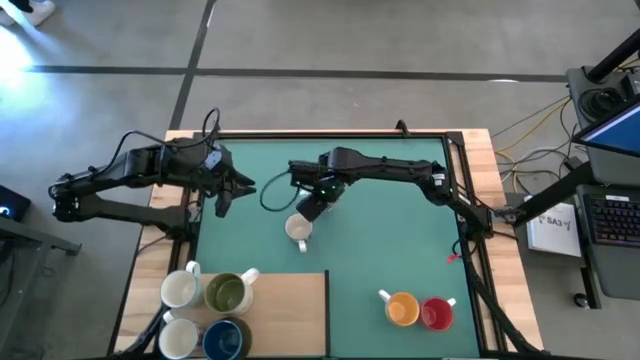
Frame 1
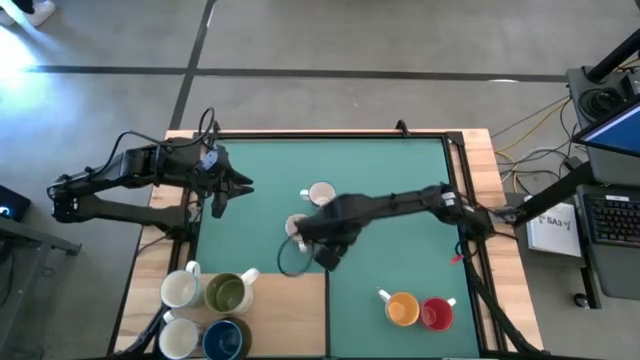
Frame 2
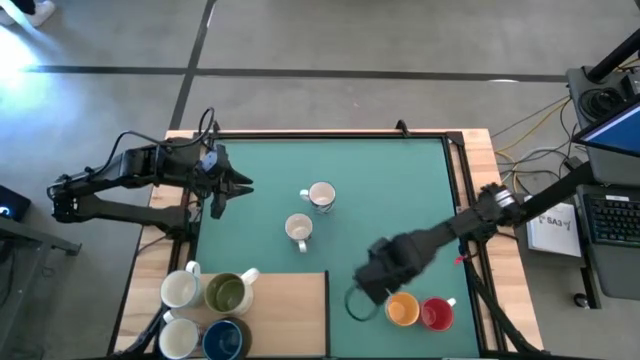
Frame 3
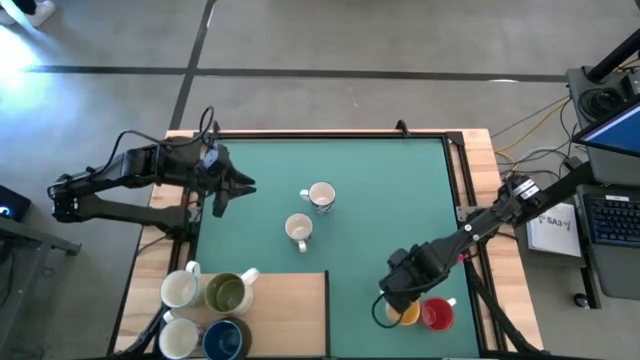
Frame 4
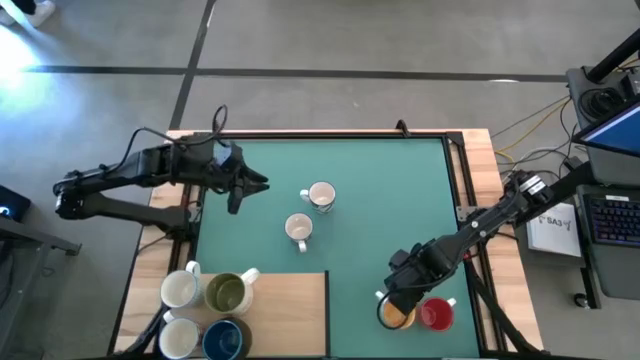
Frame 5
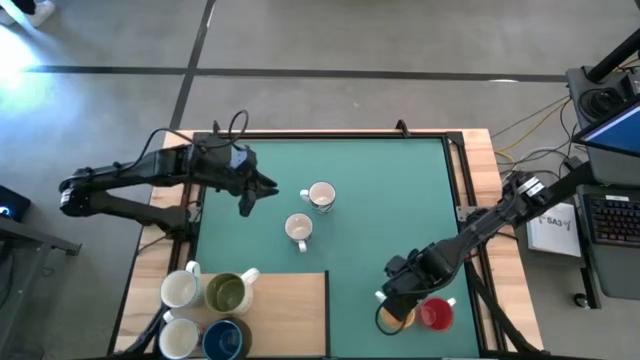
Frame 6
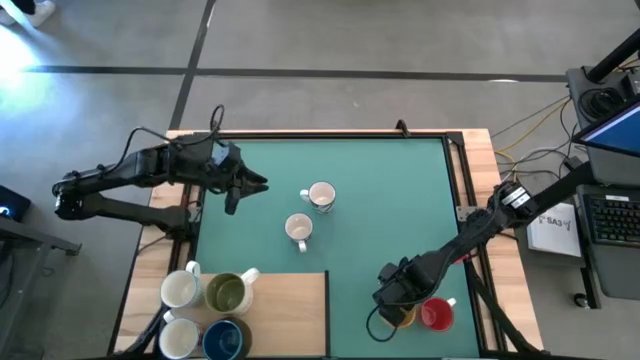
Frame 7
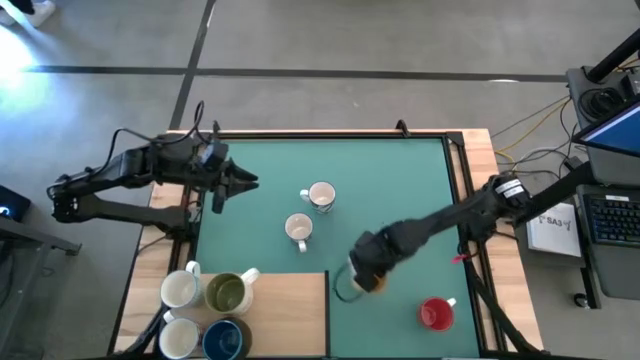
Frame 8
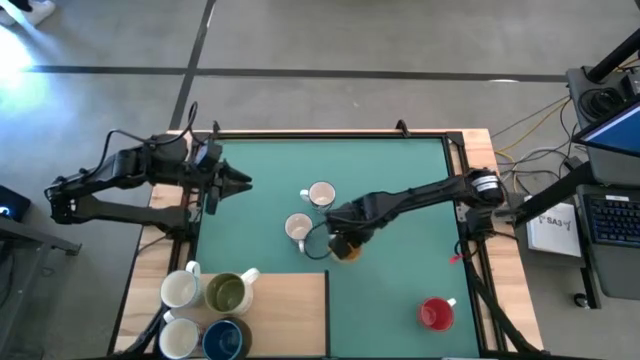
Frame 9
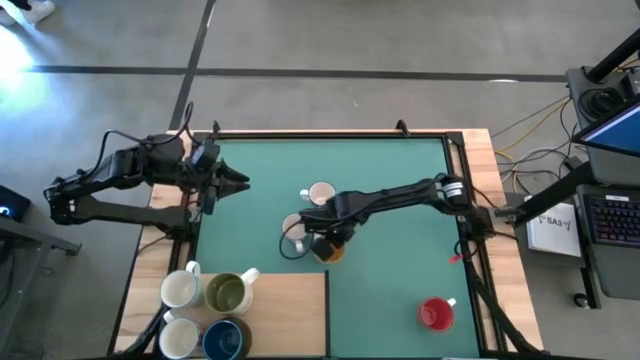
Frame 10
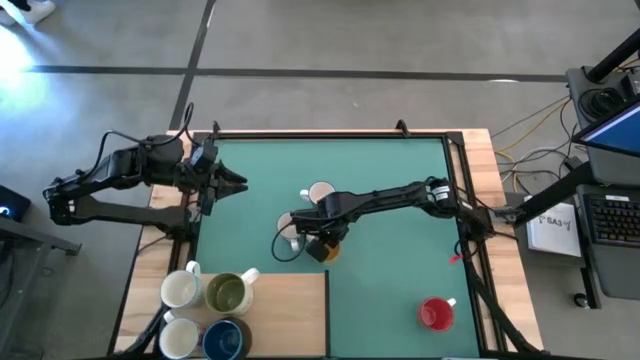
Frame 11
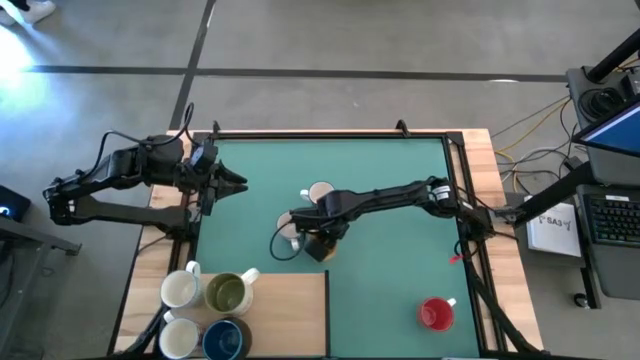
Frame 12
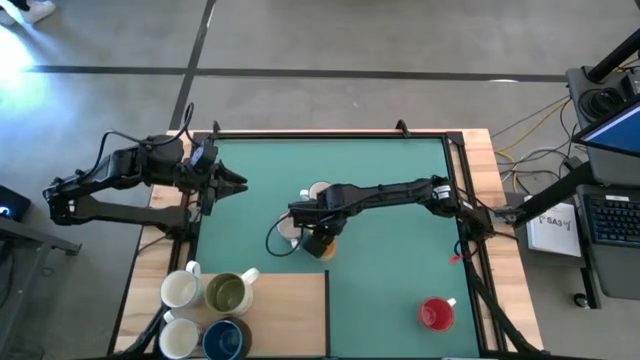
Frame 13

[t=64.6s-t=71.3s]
Task: Place coffee mugs
Move the yellow mug to the center of the table

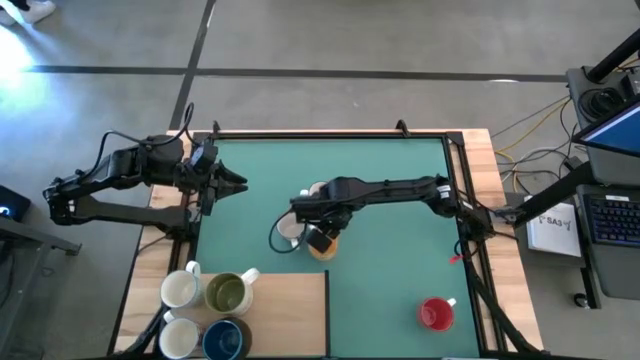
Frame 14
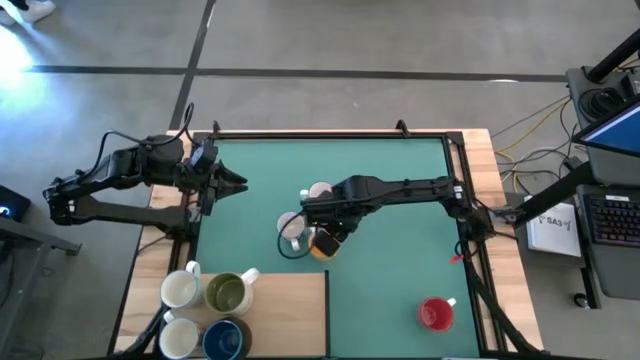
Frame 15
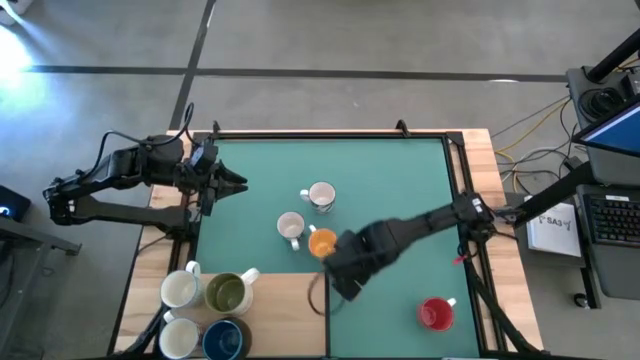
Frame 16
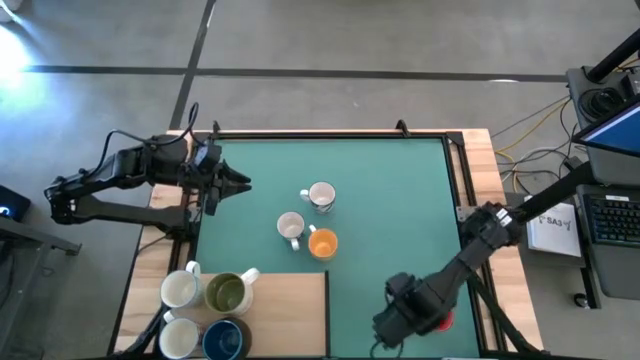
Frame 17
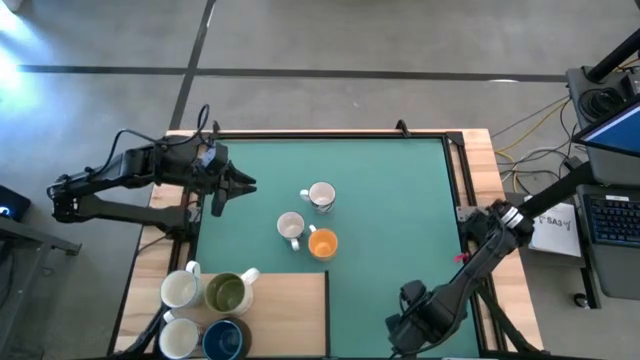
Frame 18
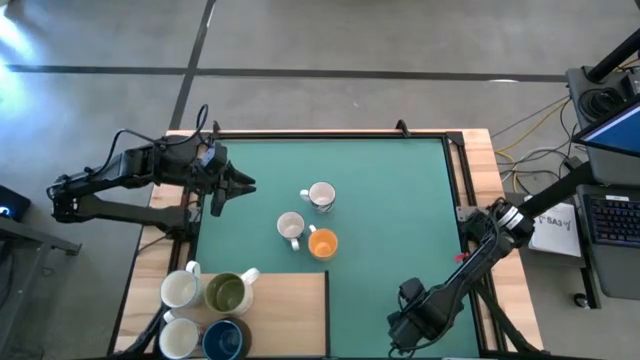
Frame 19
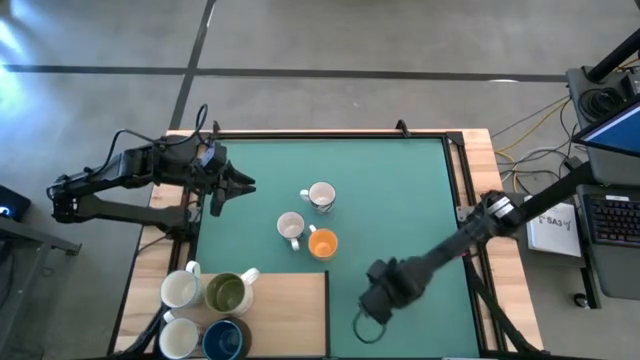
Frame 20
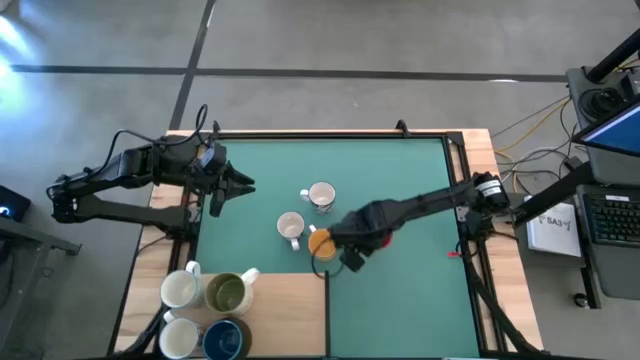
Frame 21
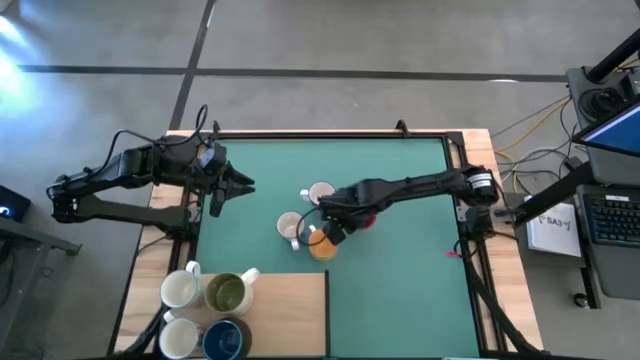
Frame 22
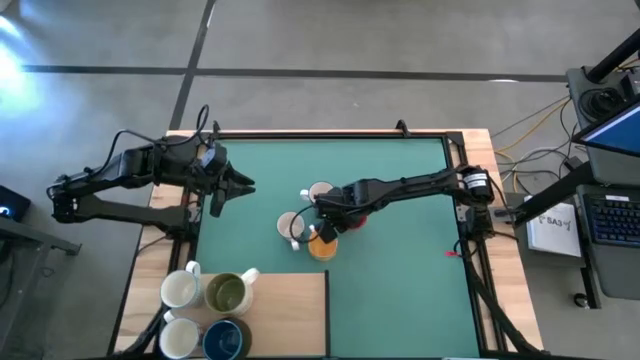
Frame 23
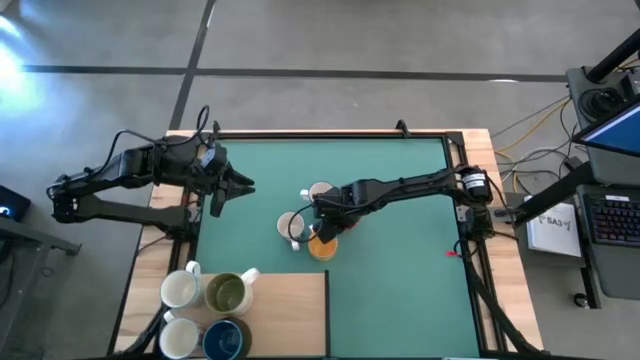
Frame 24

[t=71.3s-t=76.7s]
Move the red mug to the center of the table

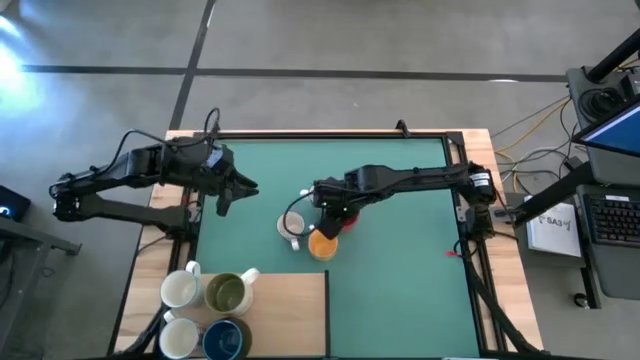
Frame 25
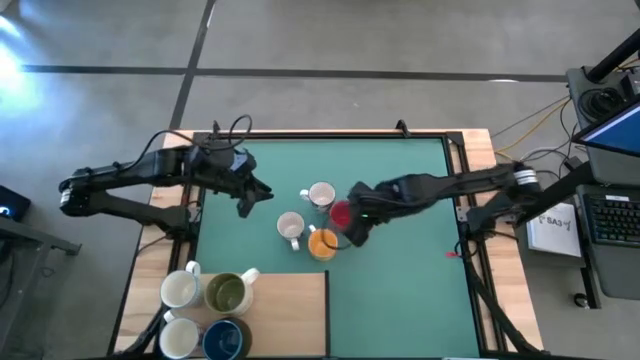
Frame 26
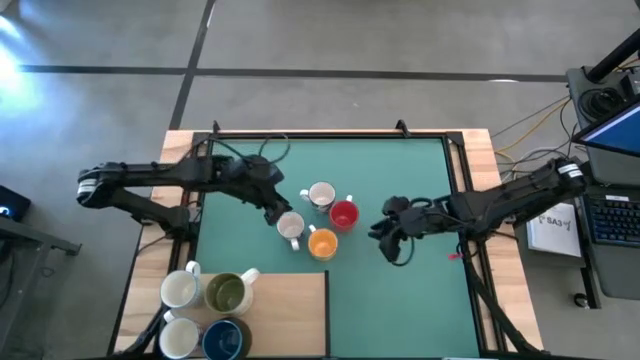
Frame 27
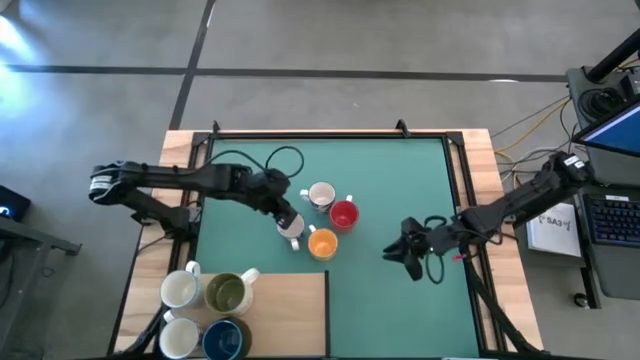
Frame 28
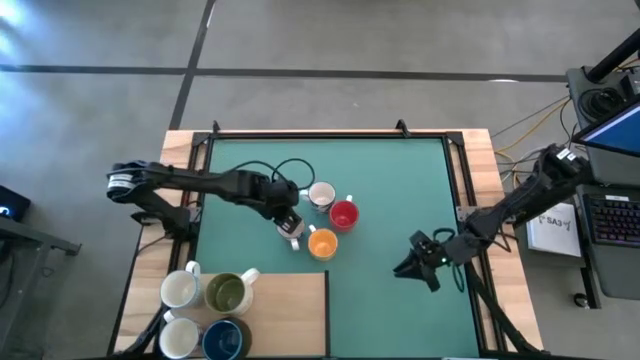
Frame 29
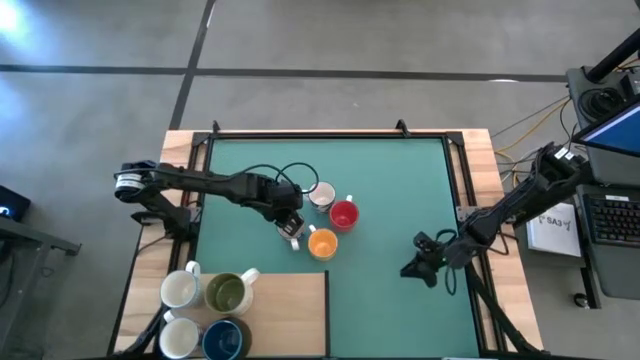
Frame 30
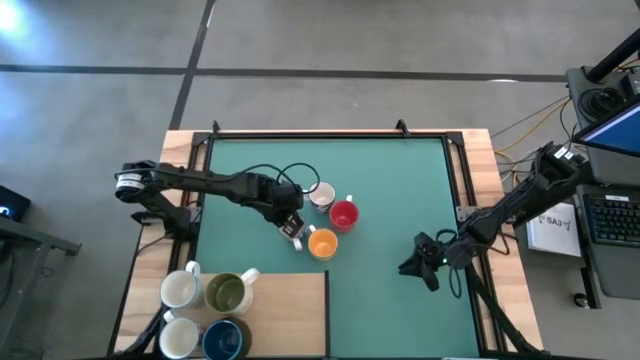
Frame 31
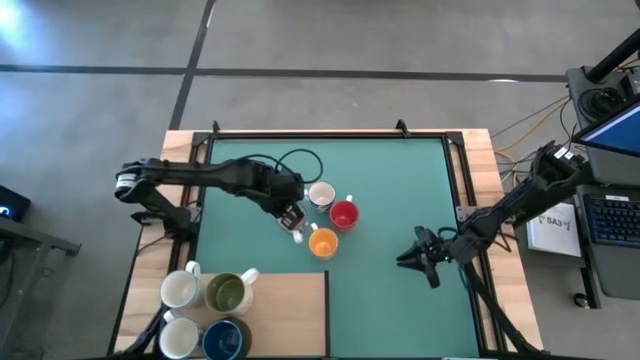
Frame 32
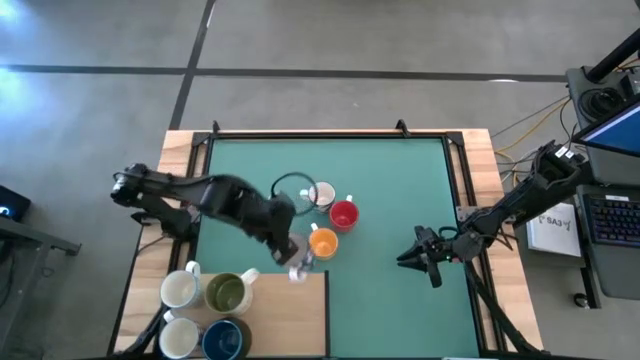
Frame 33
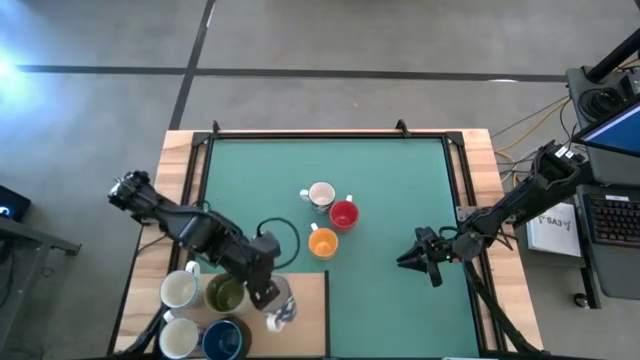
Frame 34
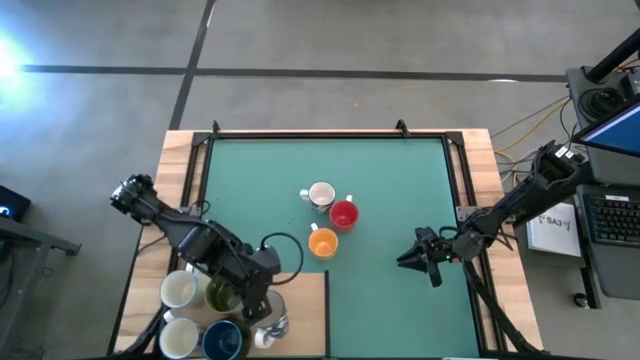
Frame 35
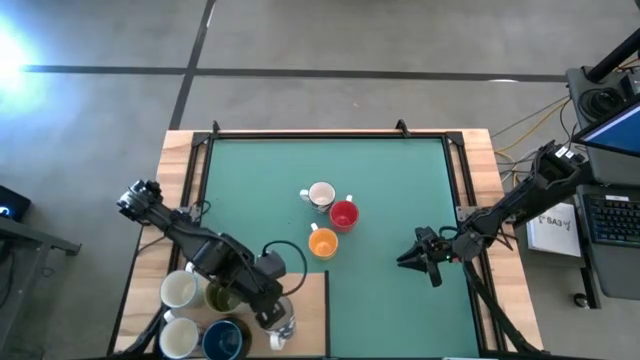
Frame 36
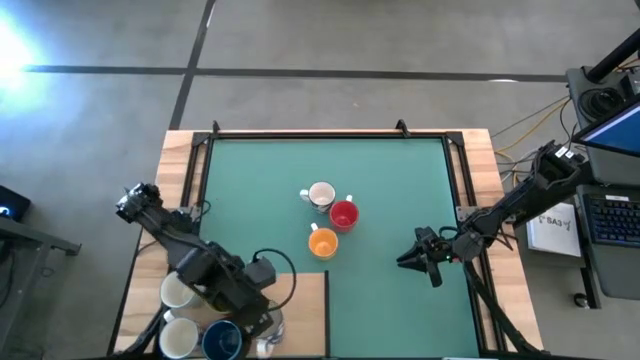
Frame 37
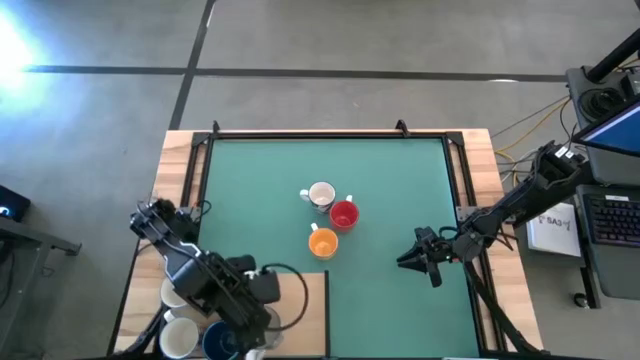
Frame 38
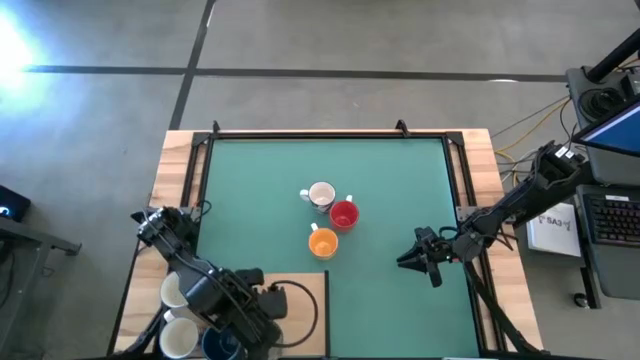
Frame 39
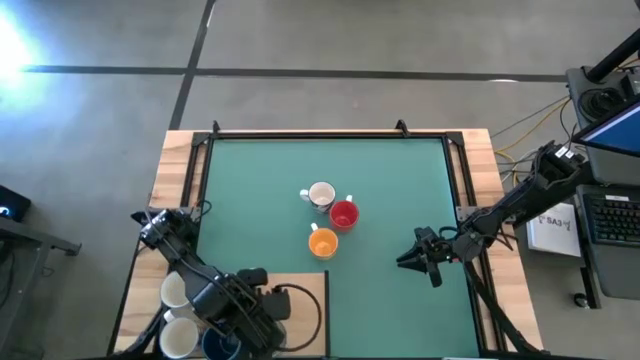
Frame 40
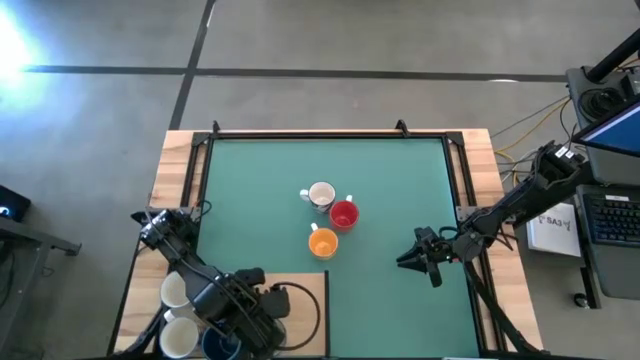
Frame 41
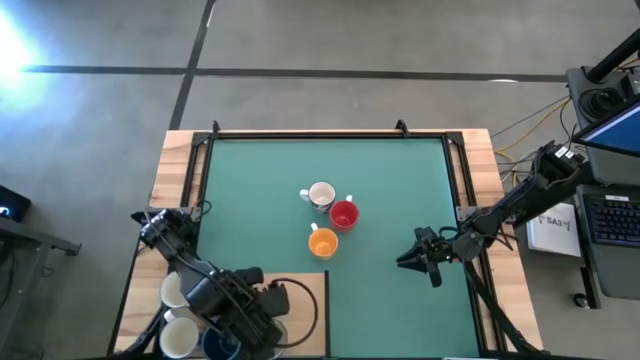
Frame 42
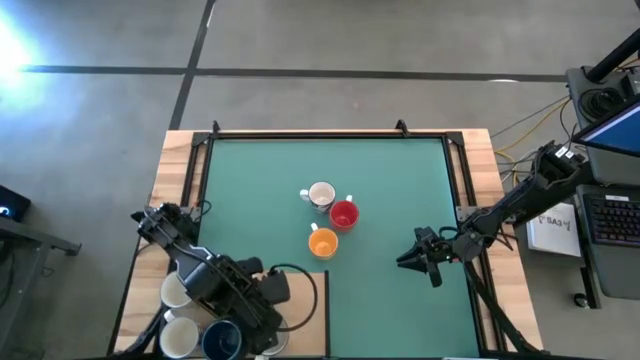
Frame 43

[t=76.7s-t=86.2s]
Put the bottom blue patterned mug on the shelf
